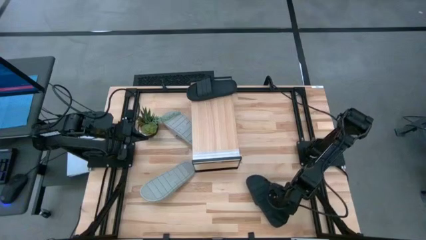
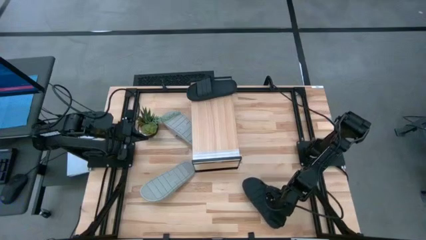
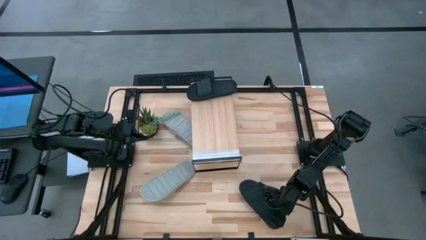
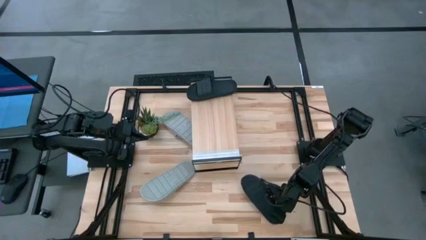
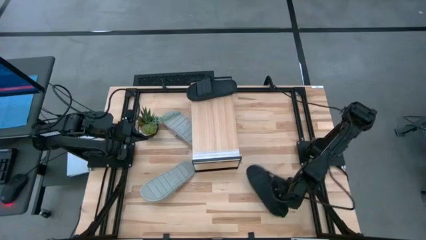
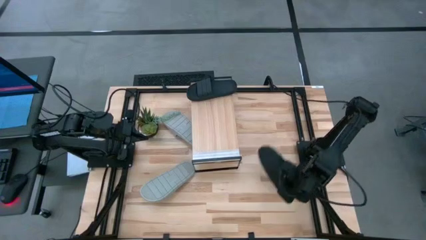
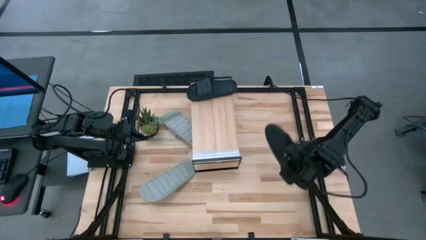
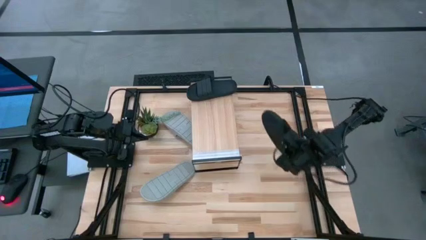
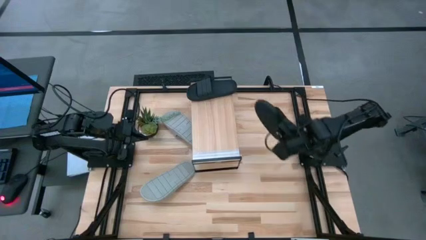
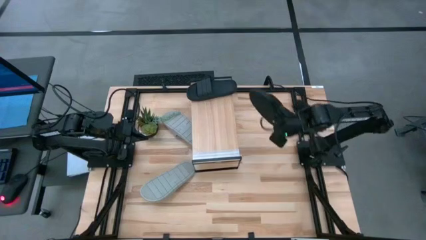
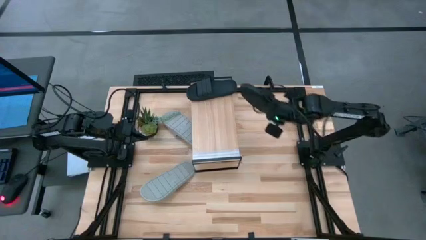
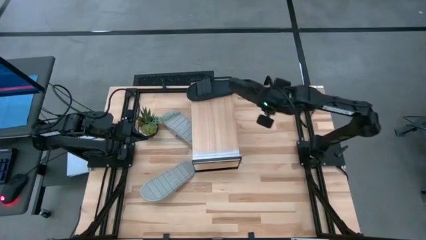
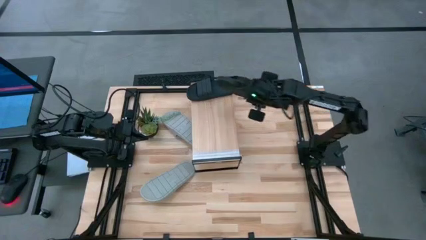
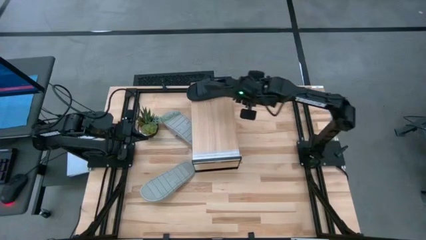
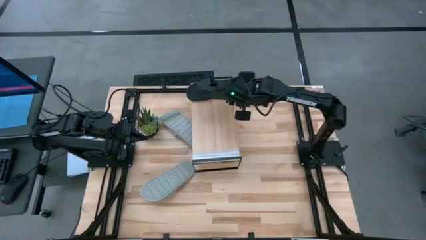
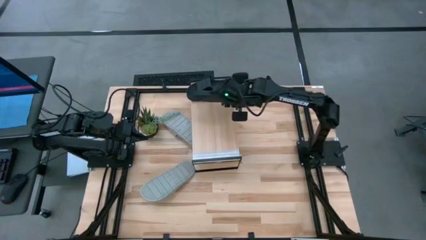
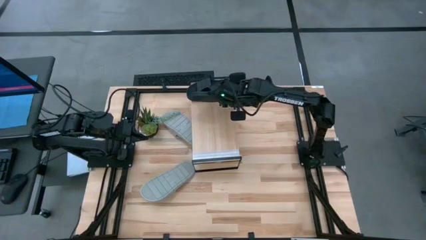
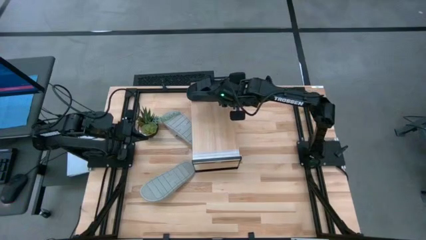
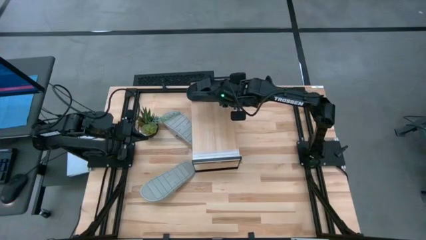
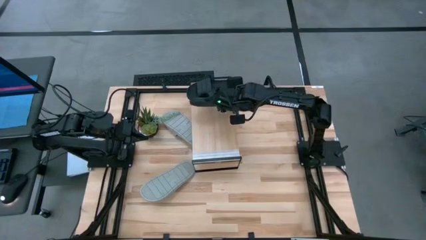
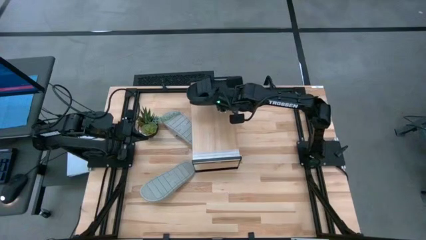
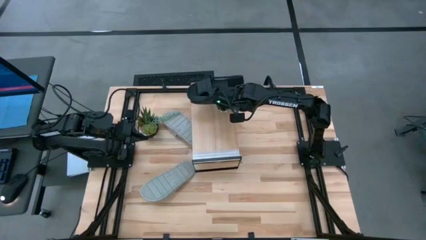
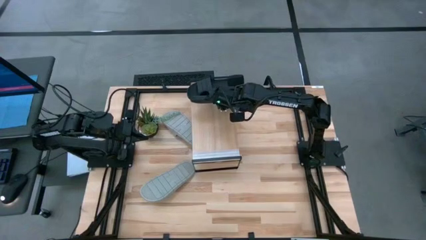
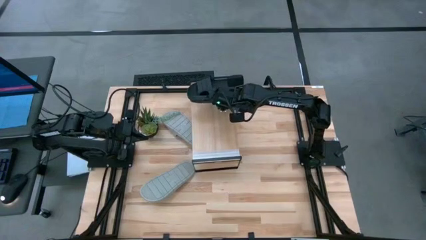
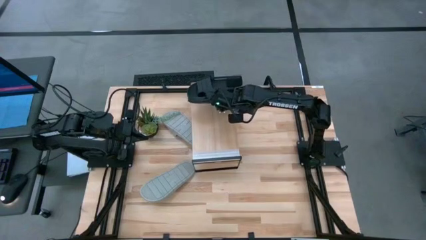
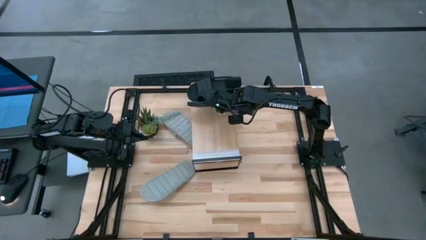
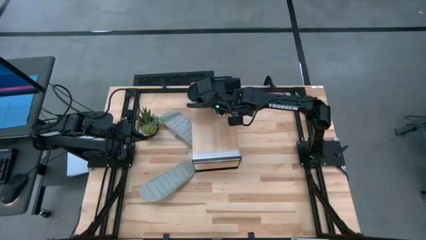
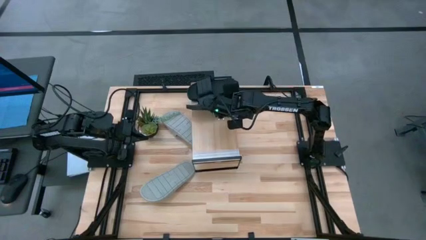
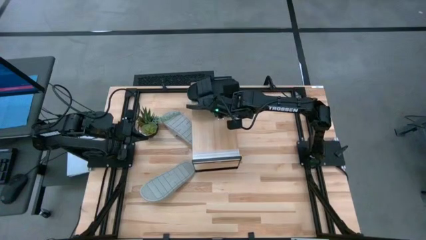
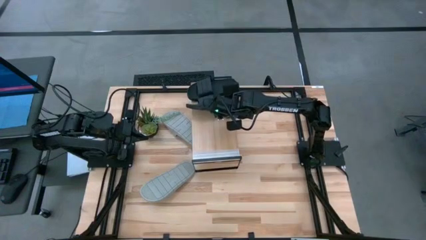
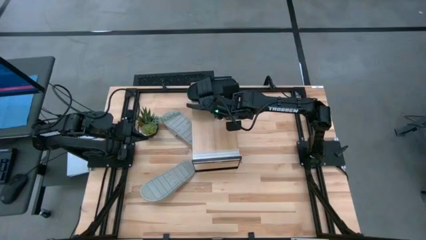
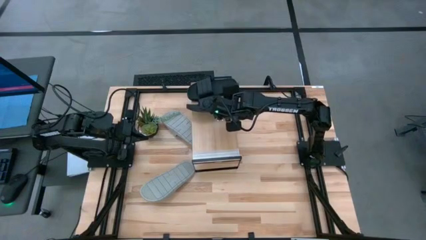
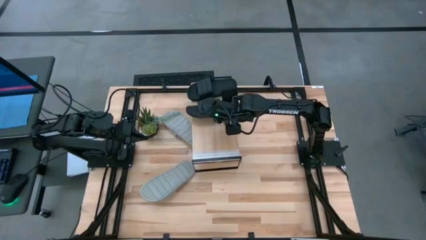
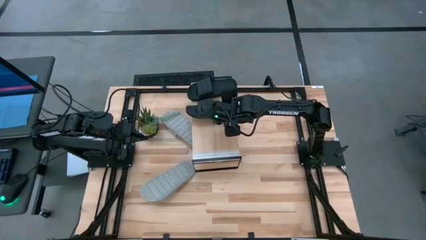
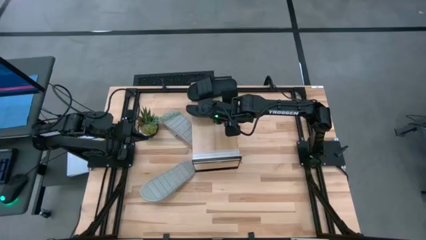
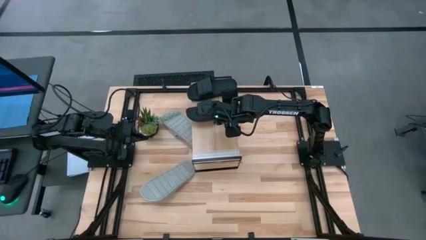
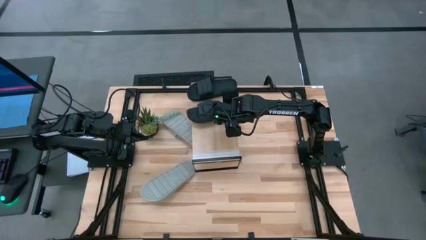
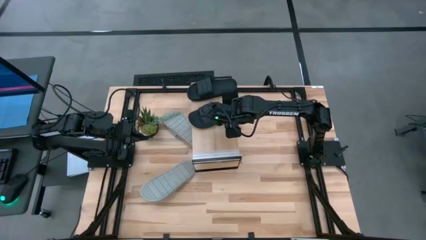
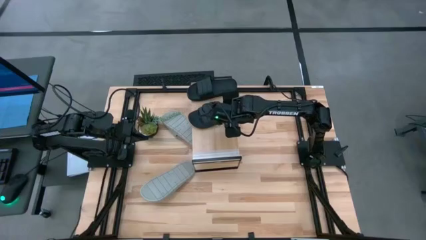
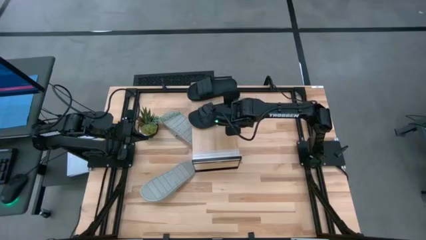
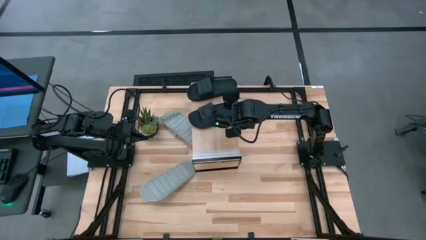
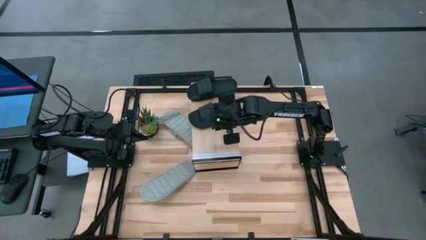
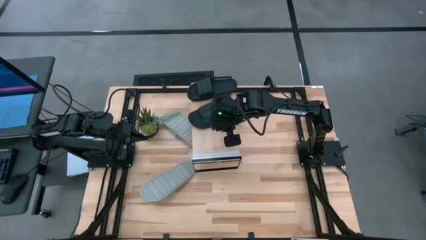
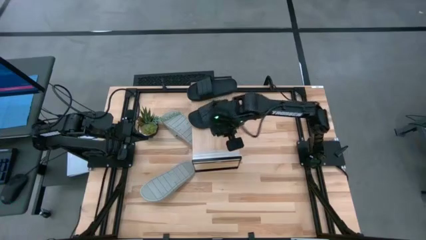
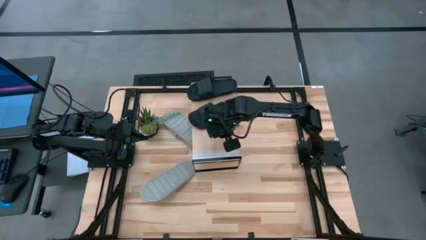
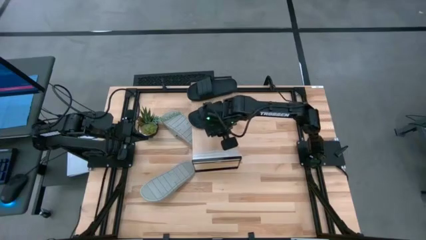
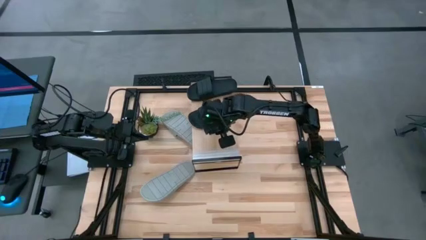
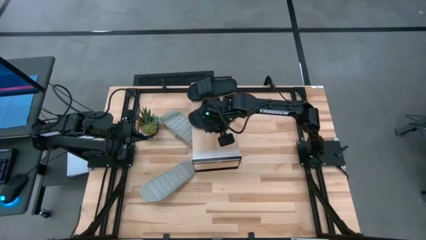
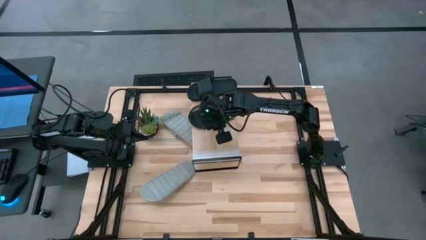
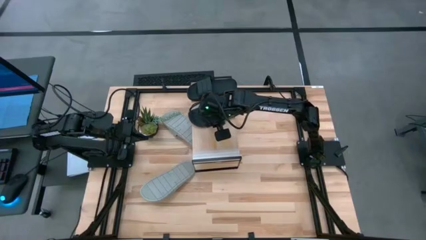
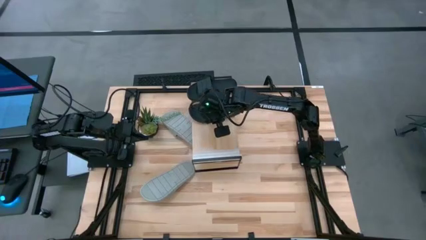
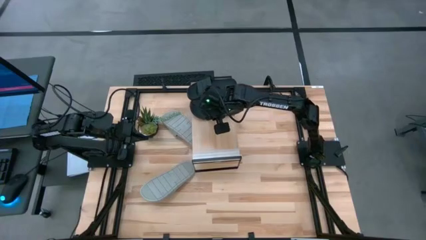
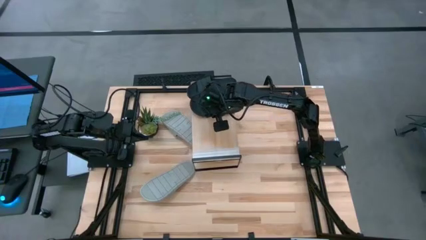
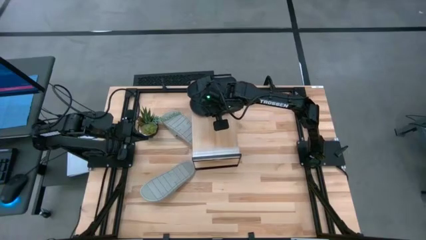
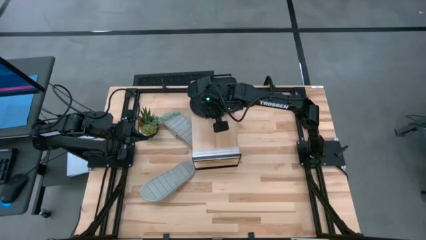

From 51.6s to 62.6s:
Task: Pick and place slides into the shelf
Put the black slide on the shelf
